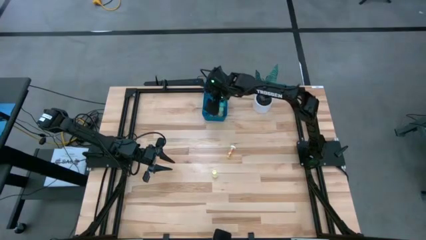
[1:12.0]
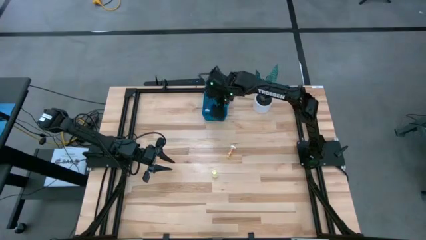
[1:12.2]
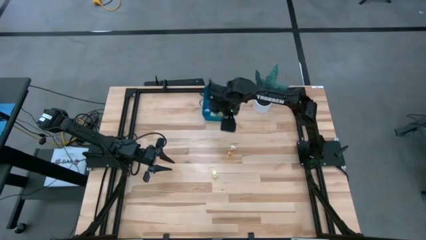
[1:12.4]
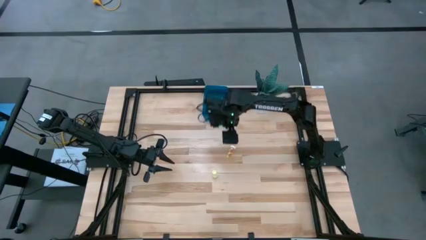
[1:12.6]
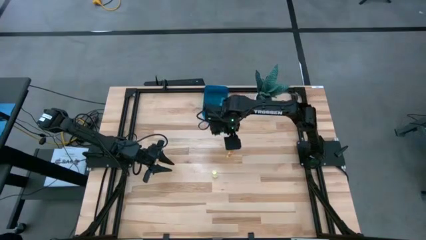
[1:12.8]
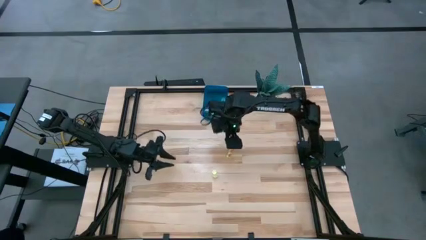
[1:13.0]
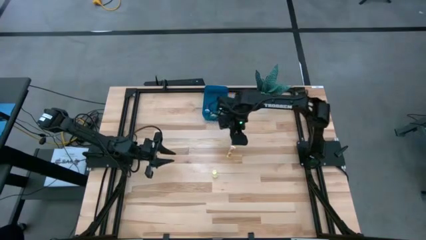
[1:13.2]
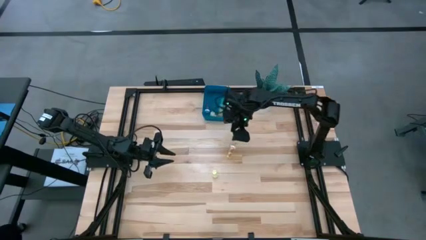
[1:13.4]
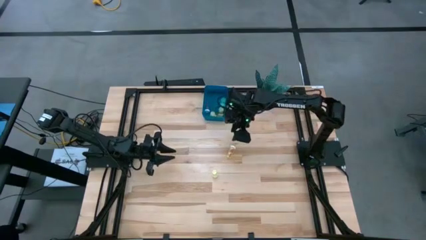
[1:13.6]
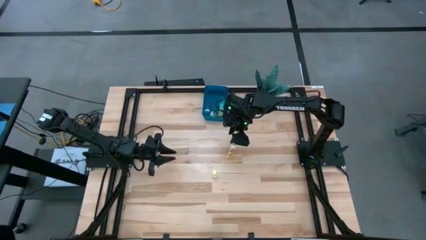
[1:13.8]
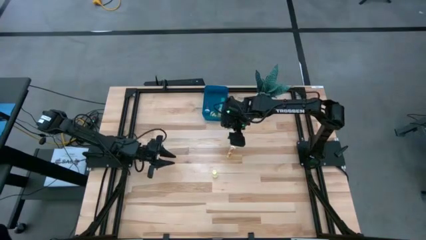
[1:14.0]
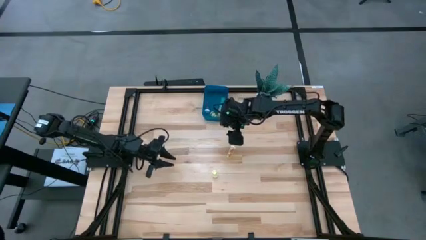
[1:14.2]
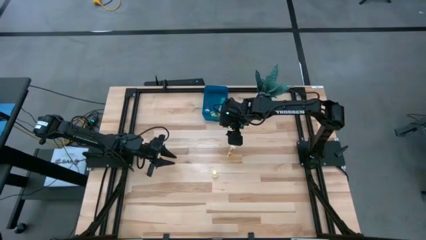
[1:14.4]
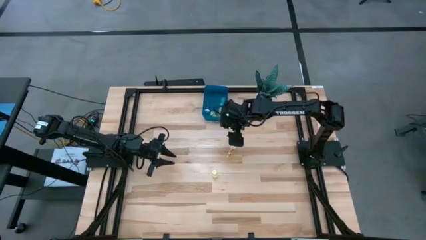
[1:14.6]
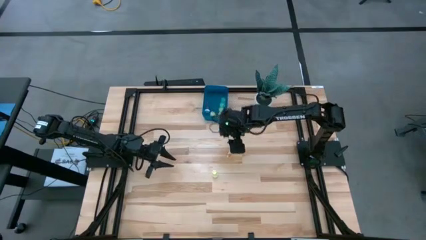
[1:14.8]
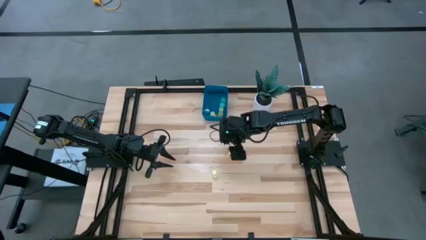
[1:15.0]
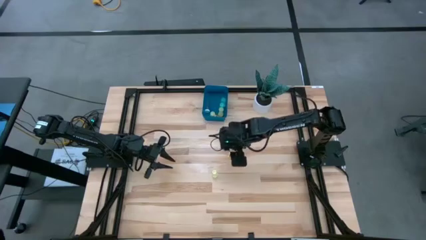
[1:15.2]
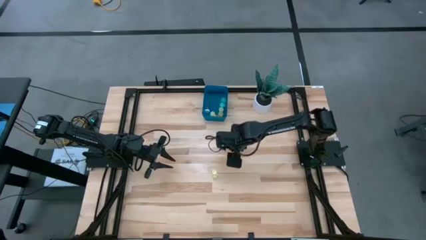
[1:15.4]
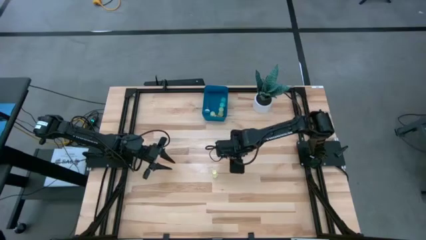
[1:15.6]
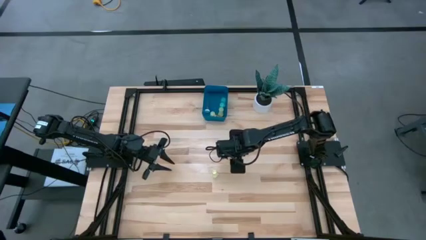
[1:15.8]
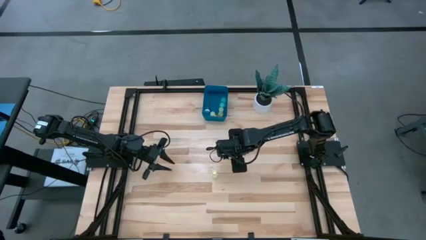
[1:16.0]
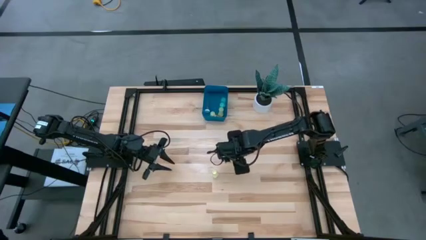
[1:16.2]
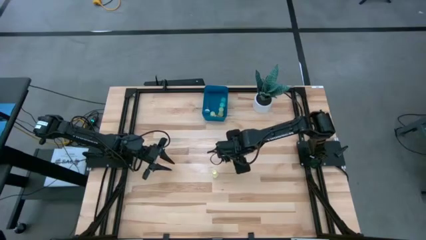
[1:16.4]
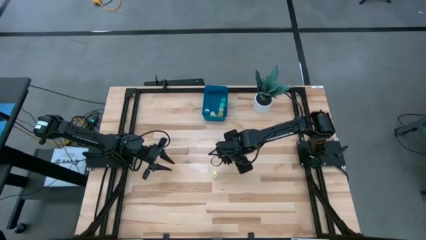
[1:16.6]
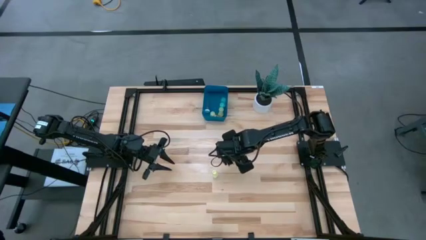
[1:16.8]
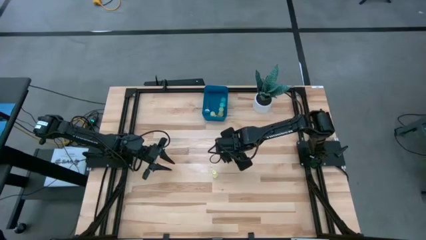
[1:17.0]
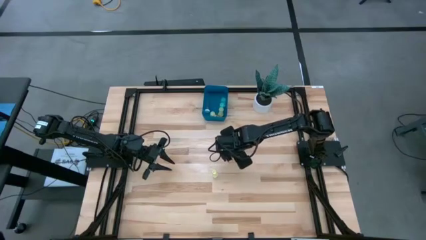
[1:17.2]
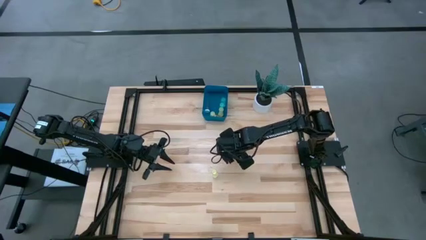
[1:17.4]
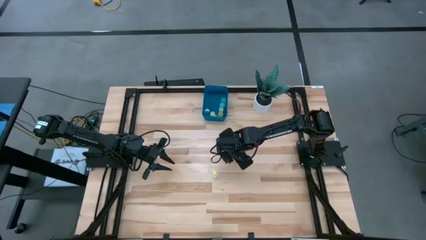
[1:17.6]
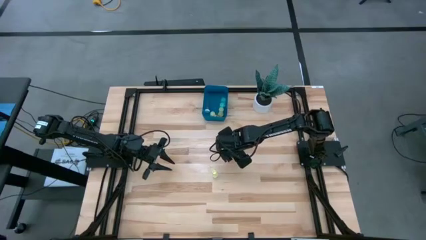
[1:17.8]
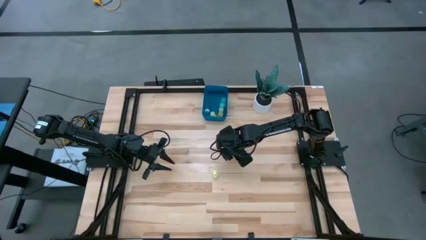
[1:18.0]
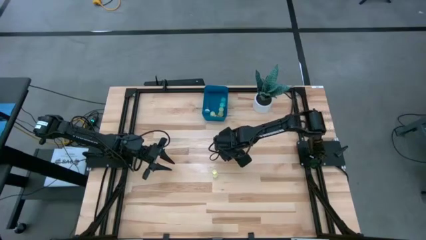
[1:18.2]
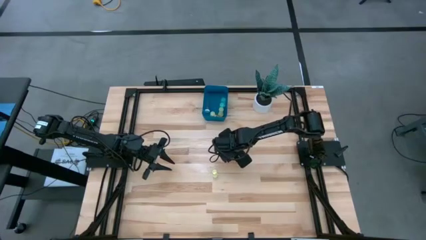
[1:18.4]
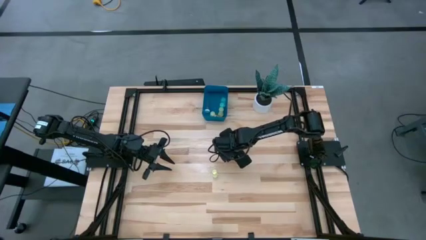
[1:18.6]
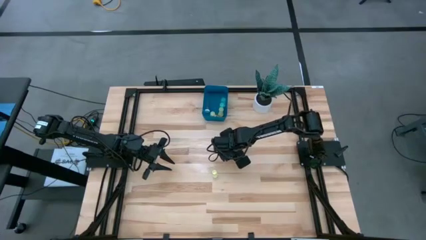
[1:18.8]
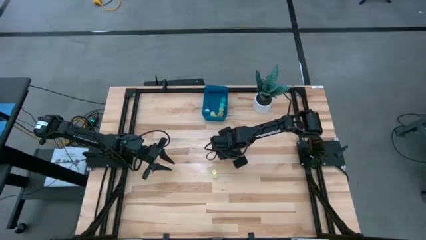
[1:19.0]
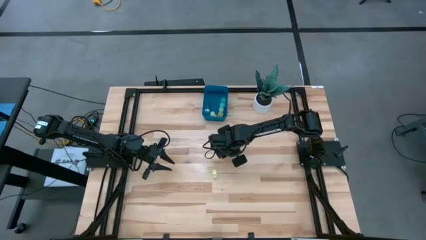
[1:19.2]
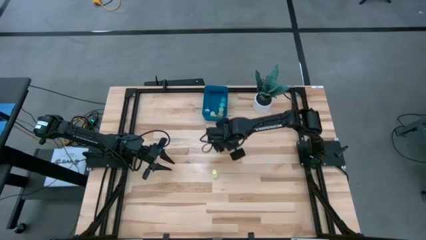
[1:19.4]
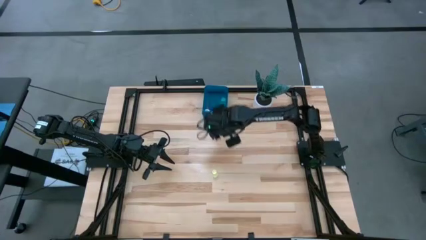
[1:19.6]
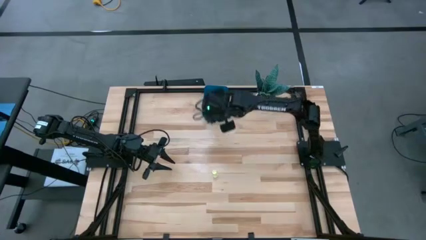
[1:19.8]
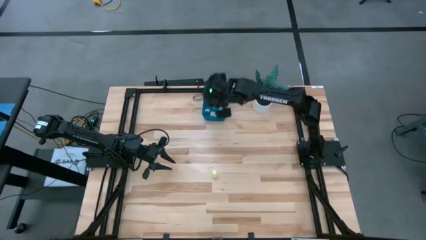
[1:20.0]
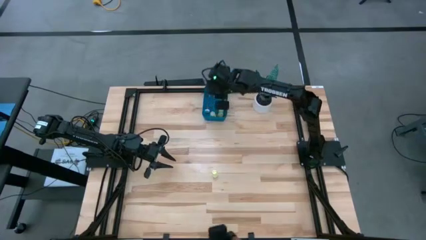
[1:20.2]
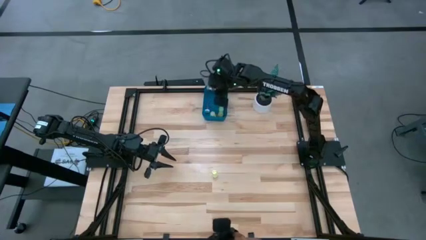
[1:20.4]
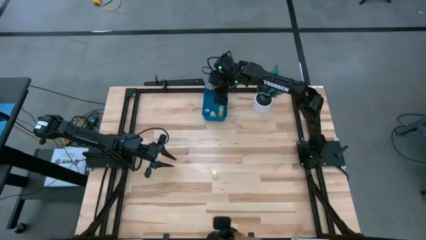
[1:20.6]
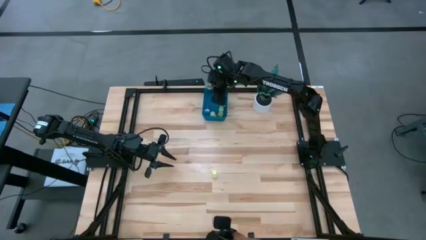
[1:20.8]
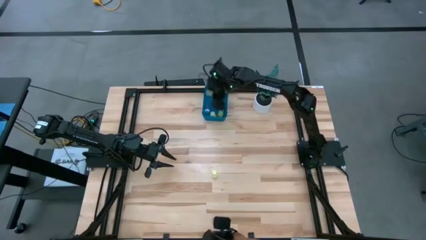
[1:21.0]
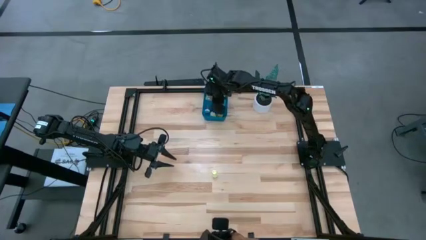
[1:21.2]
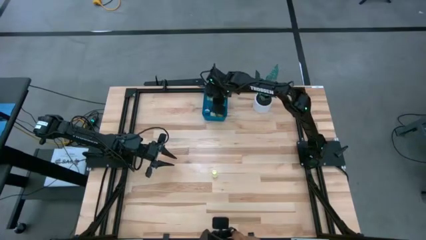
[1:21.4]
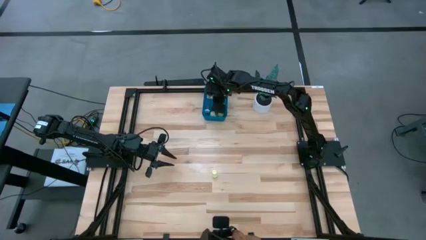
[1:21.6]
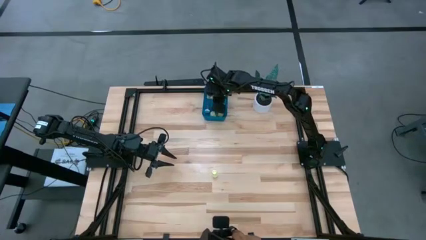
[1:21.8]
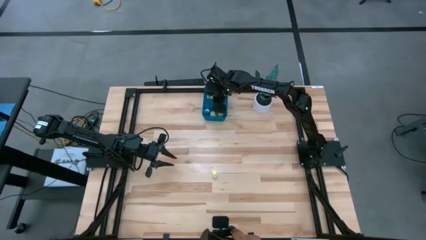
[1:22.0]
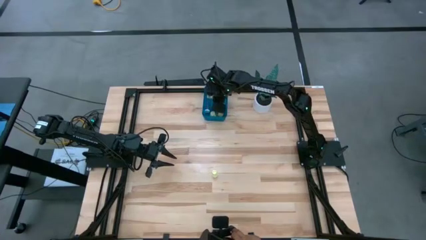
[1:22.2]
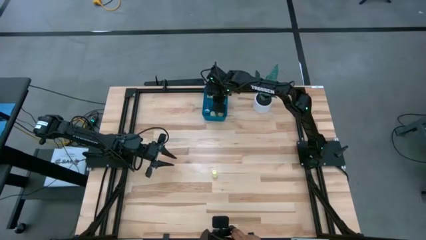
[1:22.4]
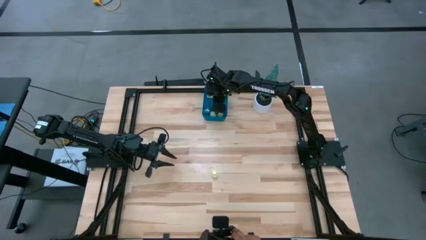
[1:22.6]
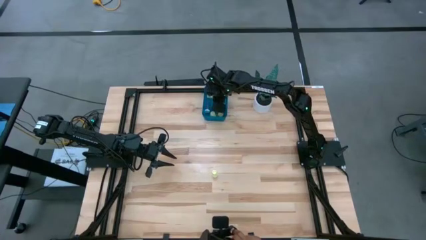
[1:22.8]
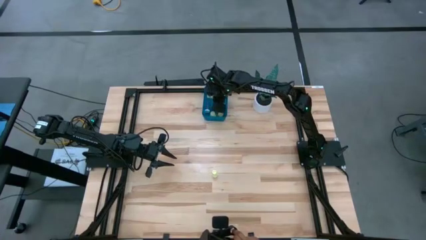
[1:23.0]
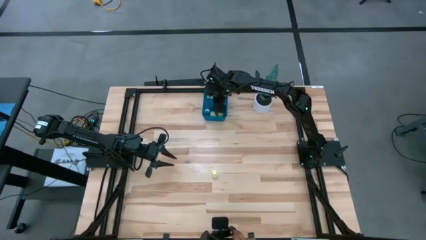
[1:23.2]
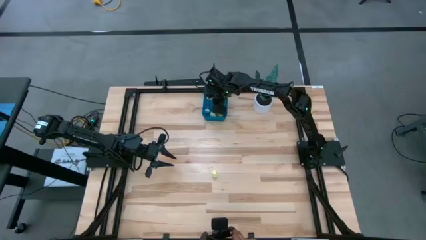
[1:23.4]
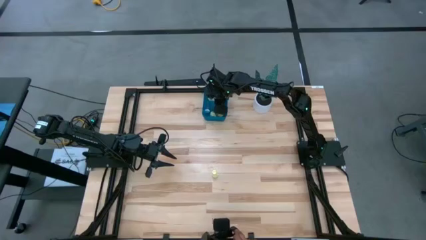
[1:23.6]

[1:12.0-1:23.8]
Task: Pick and place pill bottles into a basket
Put the top yellow pill bottle into the blue container

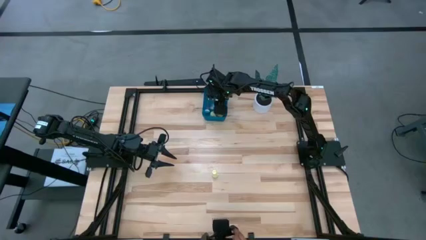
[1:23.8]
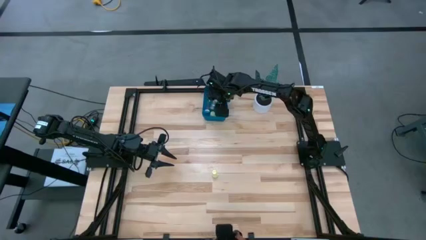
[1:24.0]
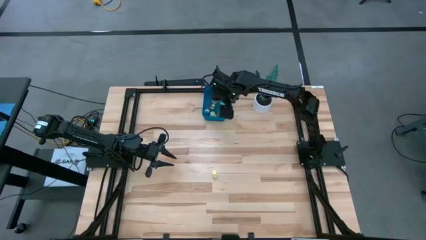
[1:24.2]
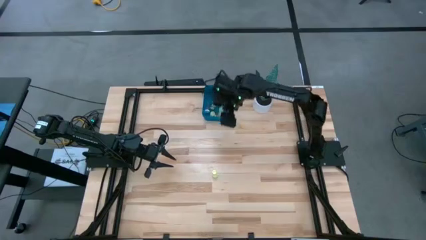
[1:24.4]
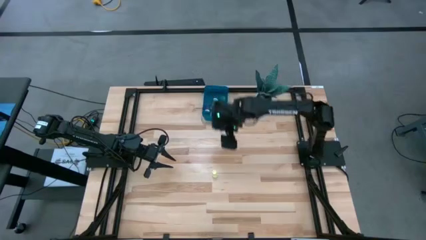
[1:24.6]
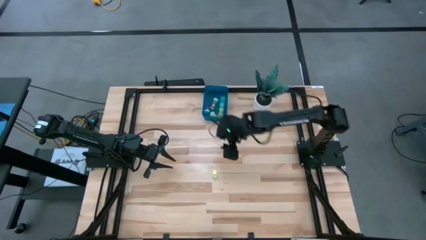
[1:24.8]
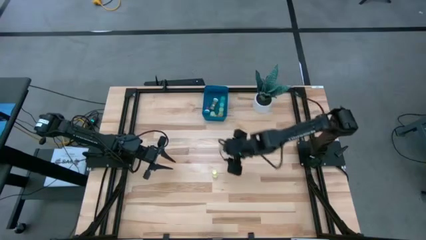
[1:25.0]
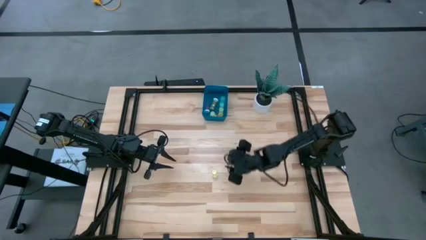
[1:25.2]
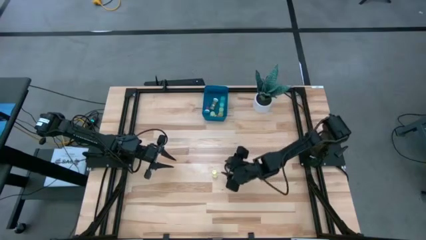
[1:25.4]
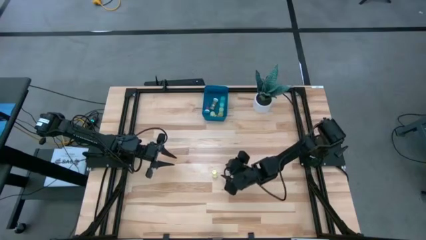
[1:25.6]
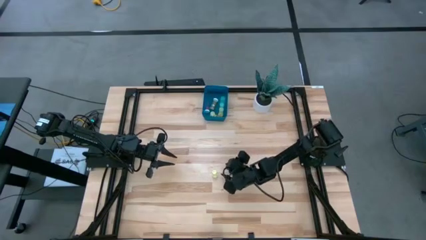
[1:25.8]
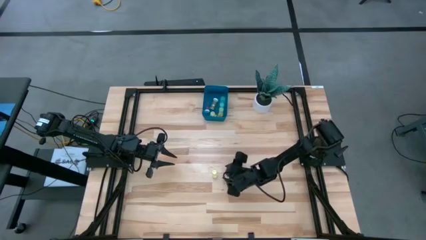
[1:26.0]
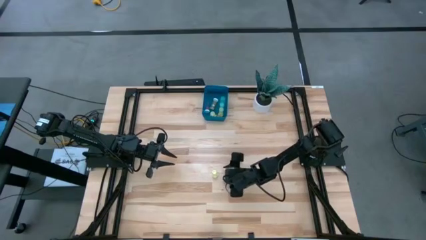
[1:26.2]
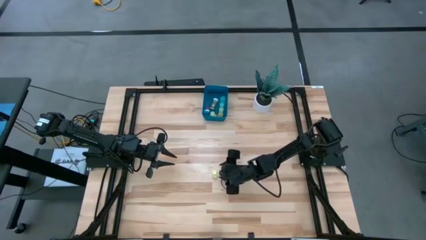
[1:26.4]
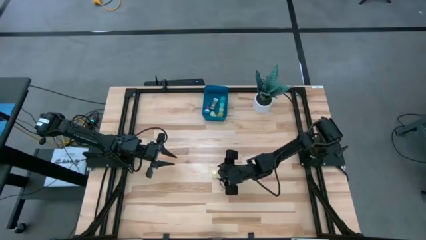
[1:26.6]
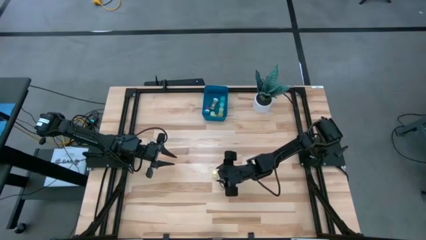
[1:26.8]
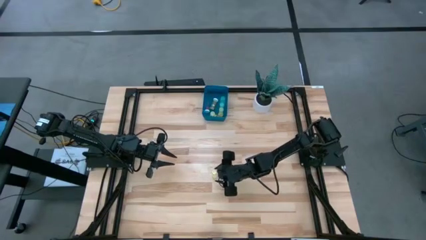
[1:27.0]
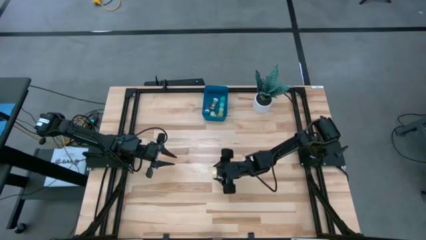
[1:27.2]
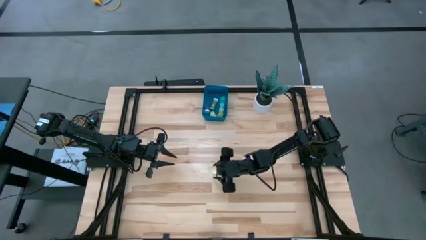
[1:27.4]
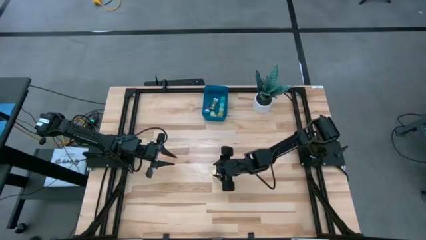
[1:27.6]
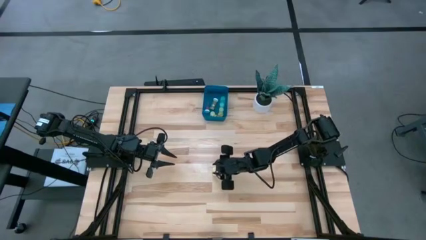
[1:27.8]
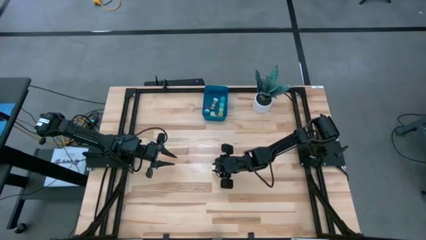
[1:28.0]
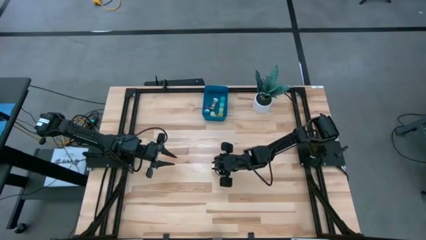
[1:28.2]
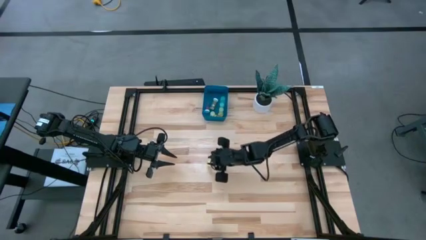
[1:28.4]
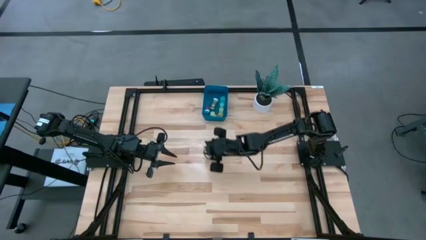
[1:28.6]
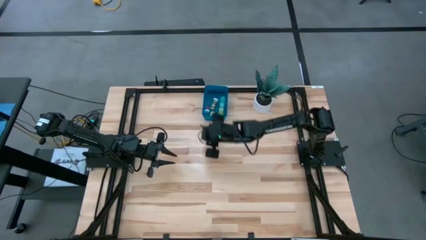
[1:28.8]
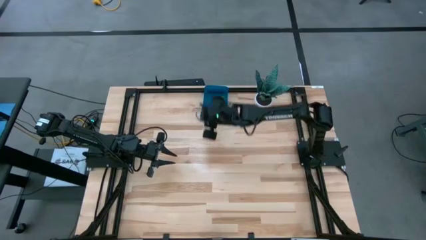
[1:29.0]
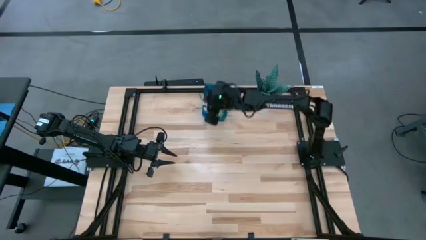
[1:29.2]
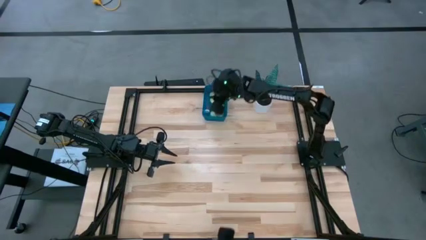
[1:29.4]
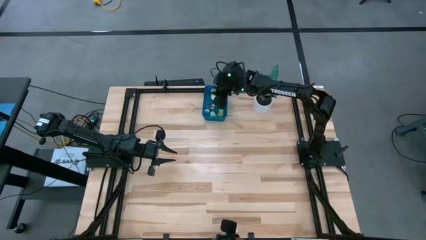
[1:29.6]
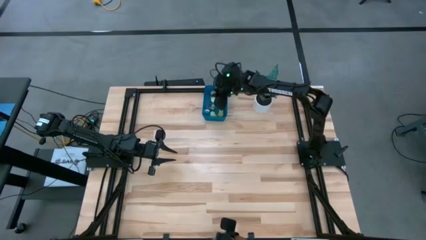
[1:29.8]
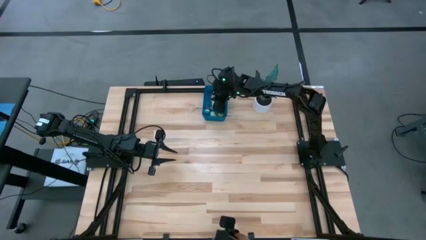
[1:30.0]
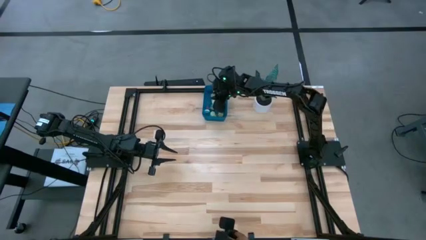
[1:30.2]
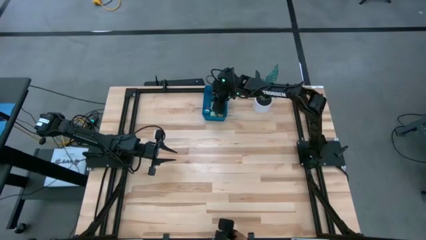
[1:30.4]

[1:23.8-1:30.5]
Put the yellow pill bottle into the blue container
